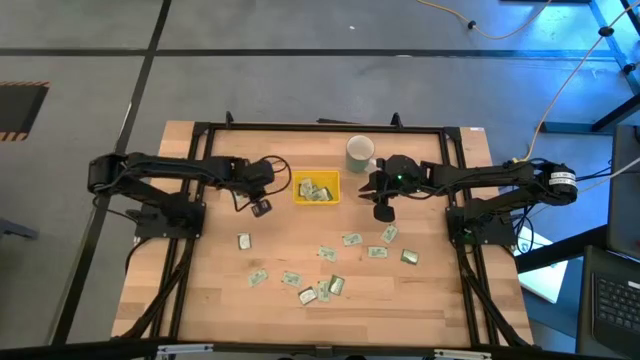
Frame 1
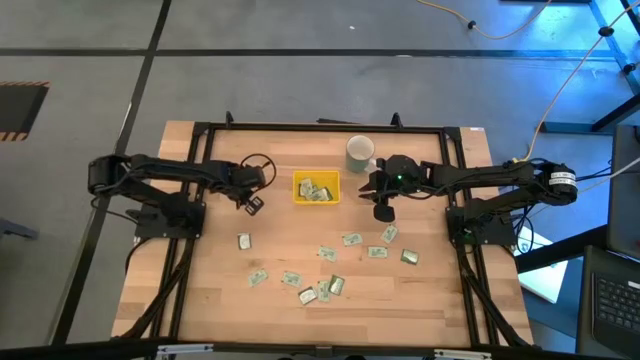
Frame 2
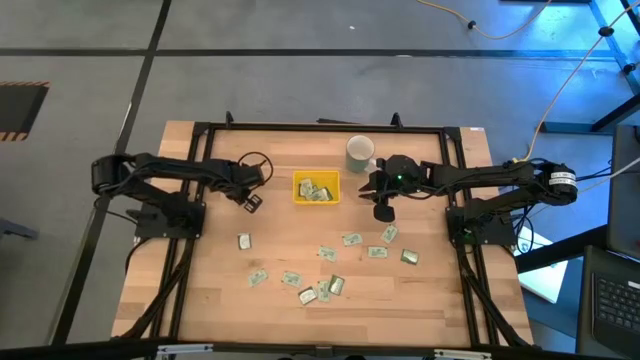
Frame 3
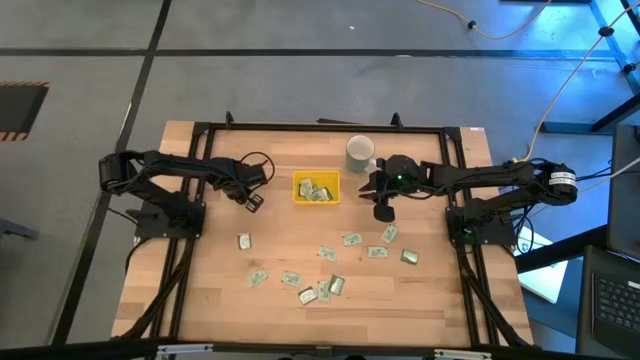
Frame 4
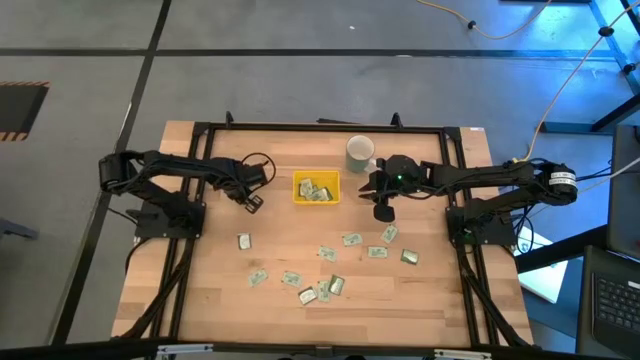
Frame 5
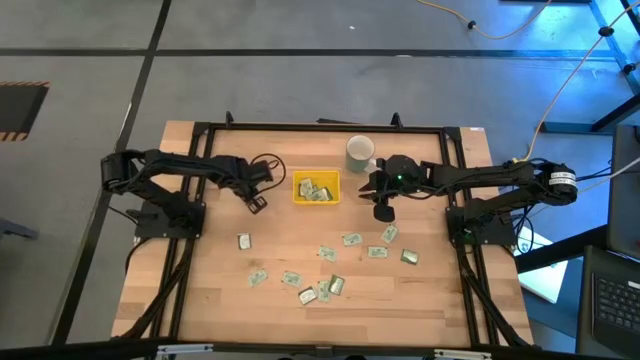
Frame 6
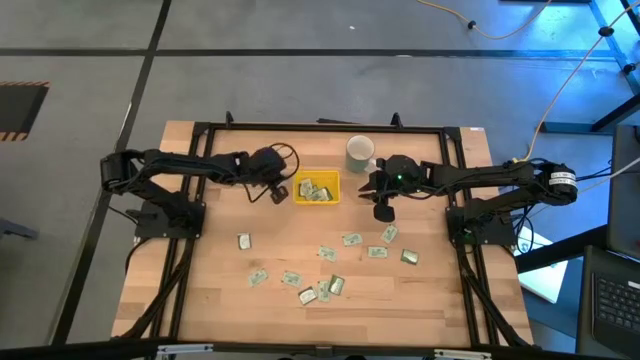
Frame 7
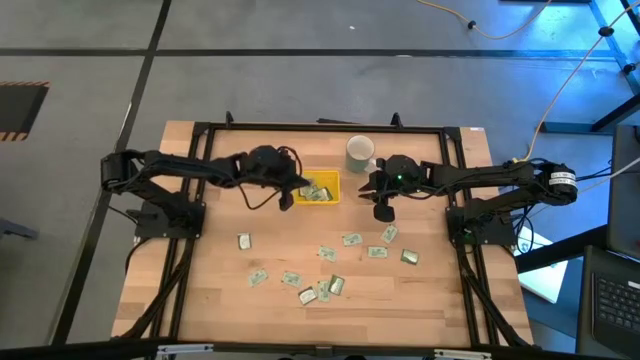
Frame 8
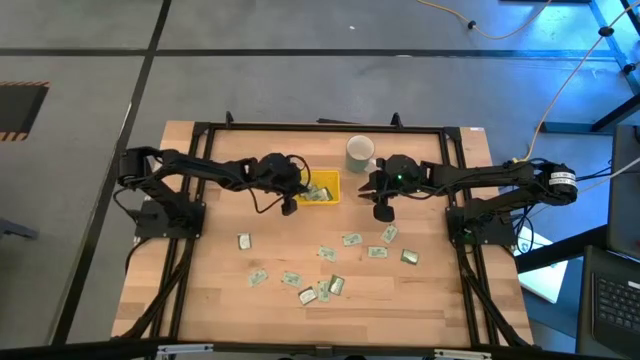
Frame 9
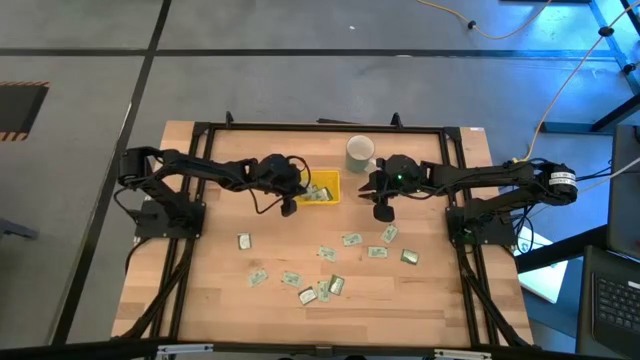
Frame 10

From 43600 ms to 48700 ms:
Task: Pick and place Stevia / Truvia into bins
Put the top left stevia tea packet into the yellow bin

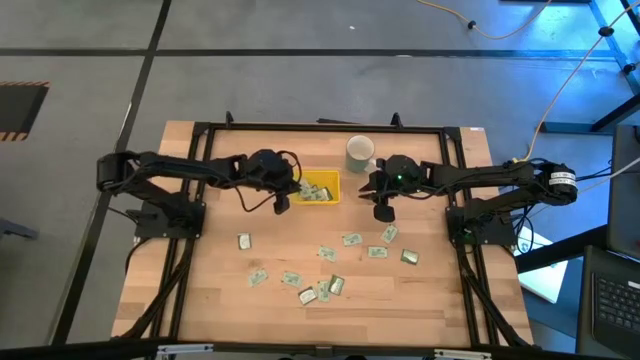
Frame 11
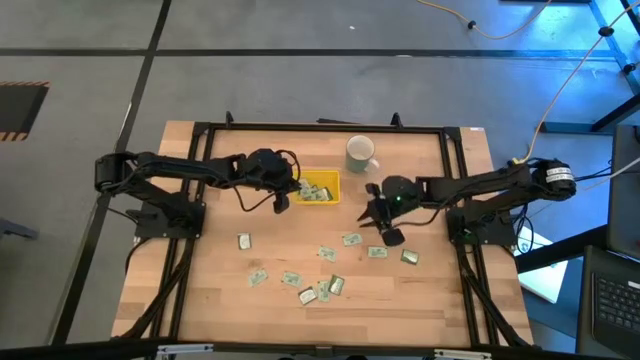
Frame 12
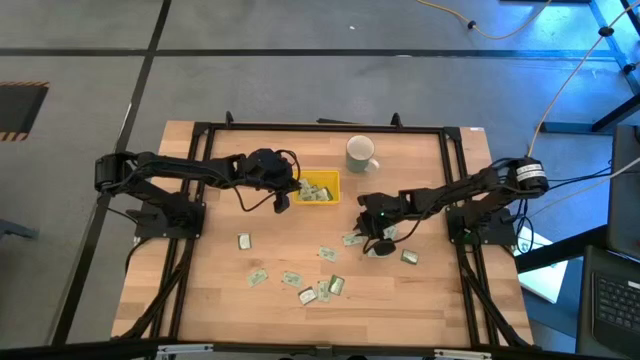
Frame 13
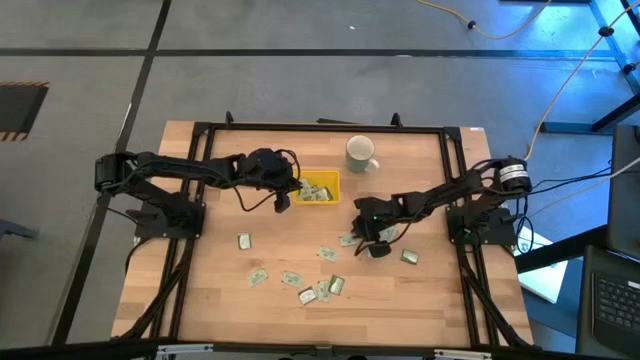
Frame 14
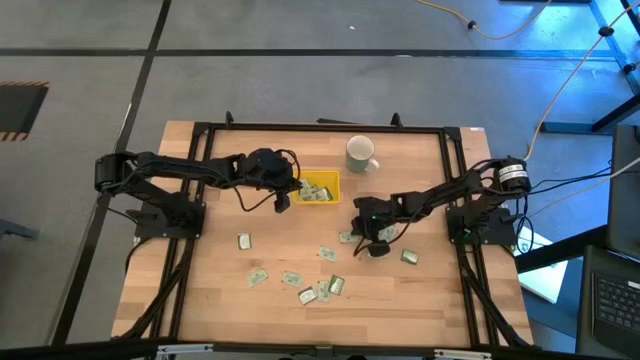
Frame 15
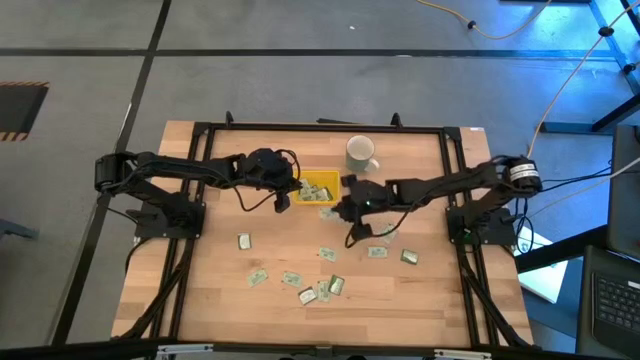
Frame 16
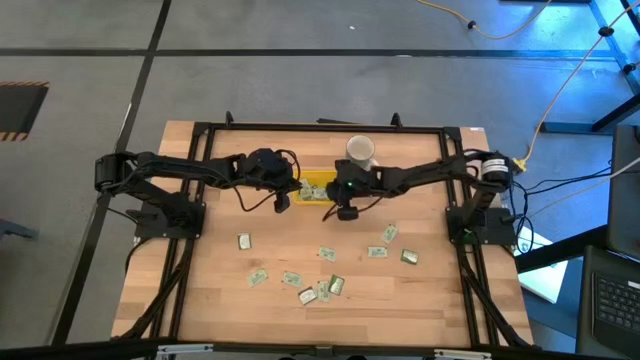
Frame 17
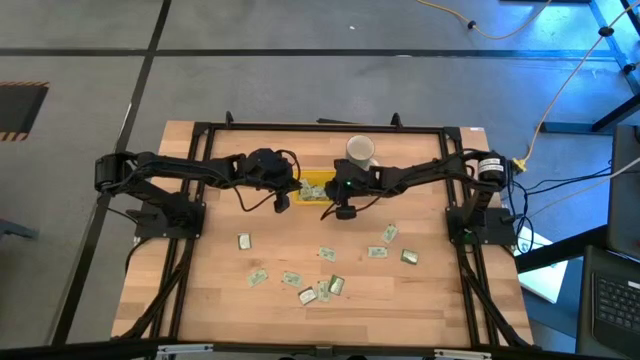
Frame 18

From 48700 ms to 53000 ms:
Put the middle stevia tea packet into the yellow bin

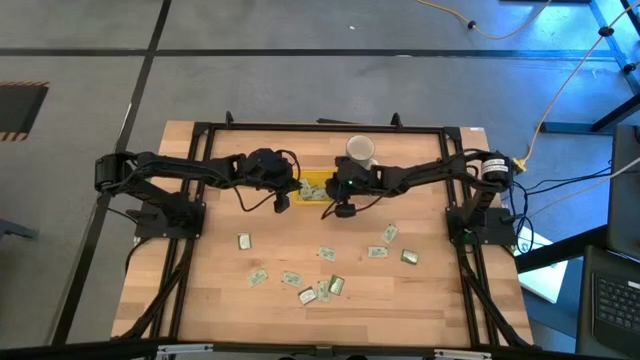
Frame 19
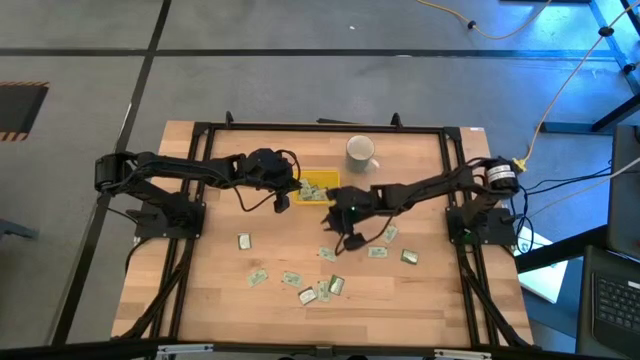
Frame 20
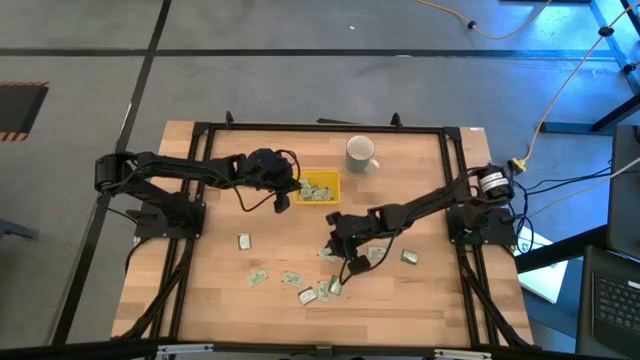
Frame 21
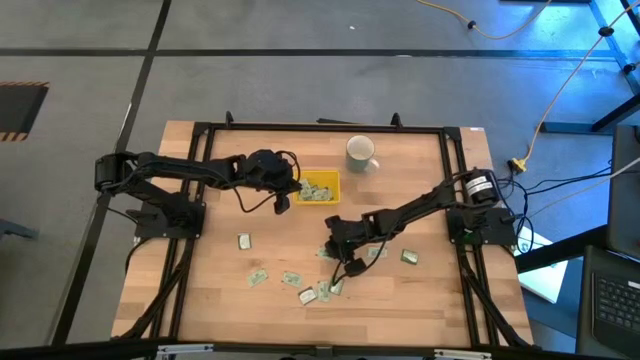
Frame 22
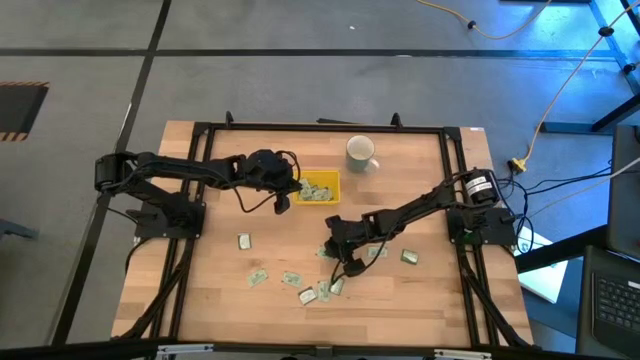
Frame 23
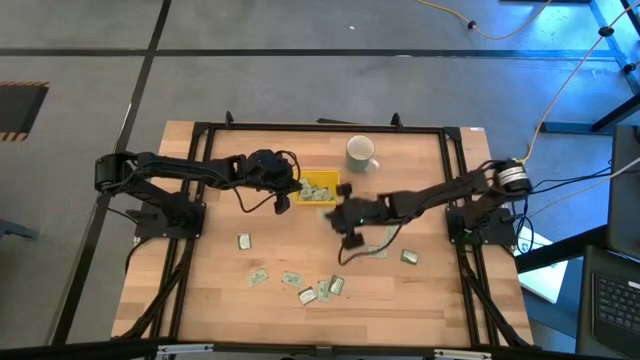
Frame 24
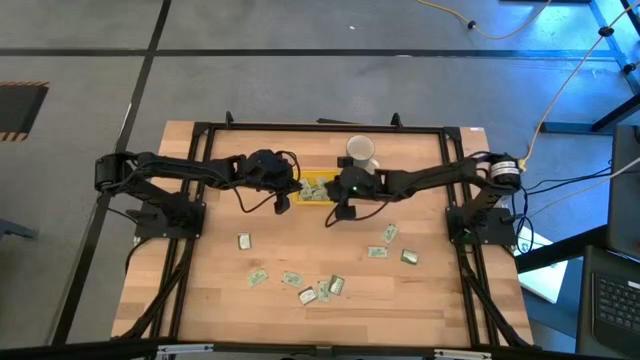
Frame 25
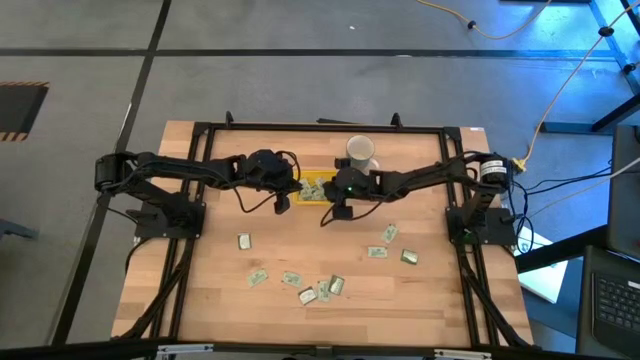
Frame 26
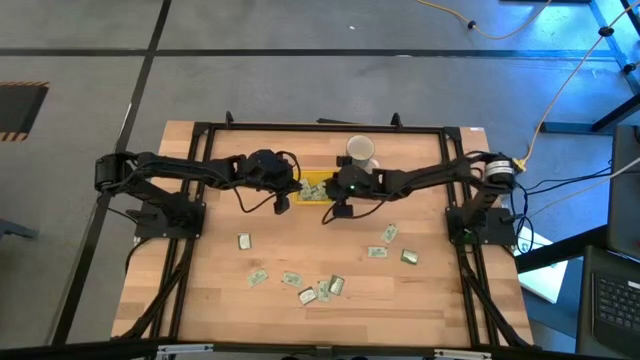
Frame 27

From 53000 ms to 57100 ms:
Put the middle stevia tea packet into the yellow bin

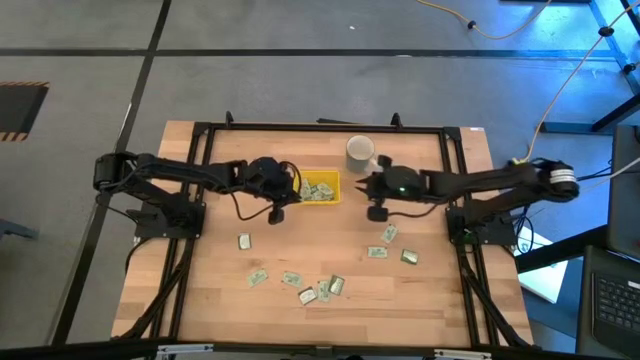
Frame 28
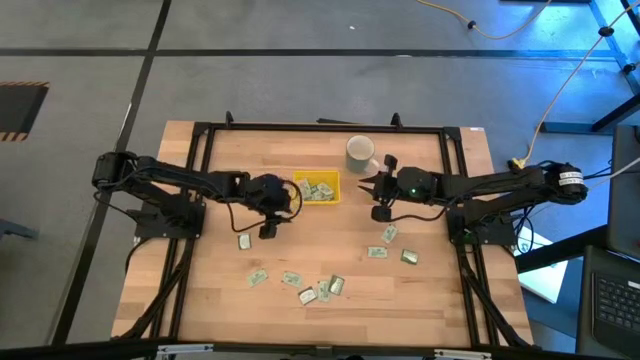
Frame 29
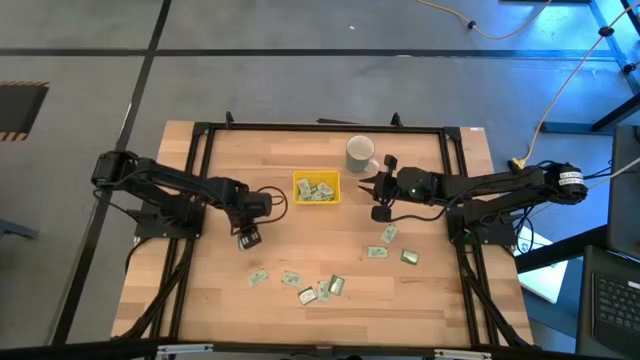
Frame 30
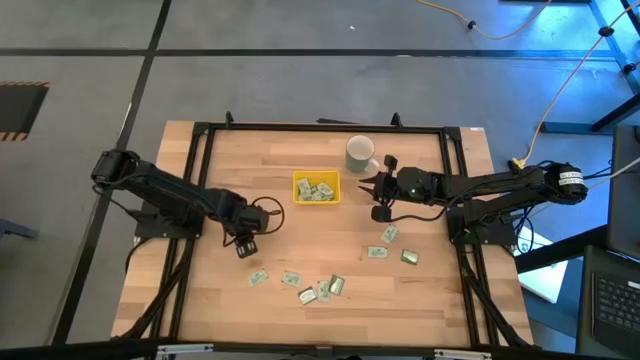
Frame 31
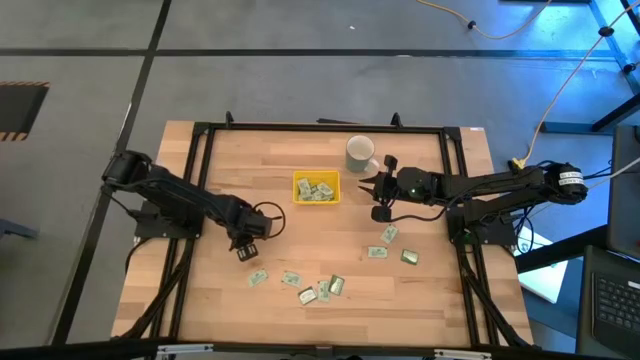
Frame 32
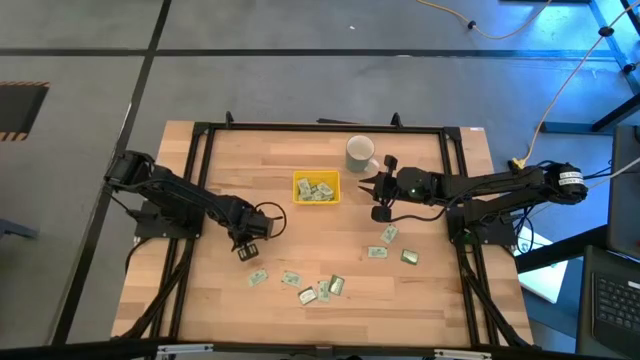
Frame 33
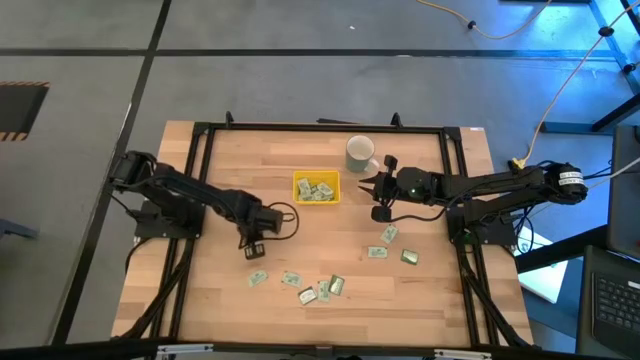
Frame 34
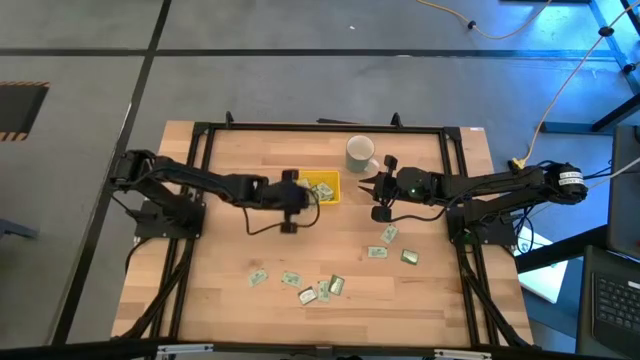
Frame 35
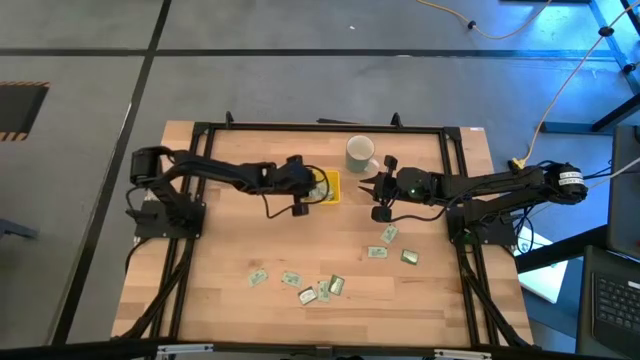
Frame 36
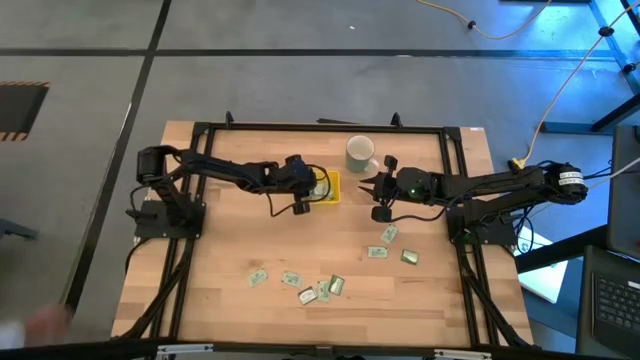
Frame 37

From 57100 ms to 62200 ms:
Put the middle truvia tea packet into the yellow bin

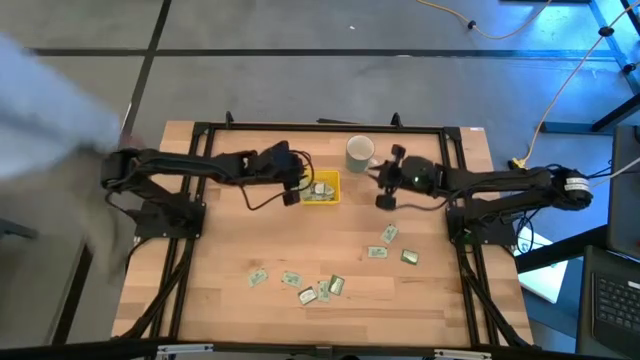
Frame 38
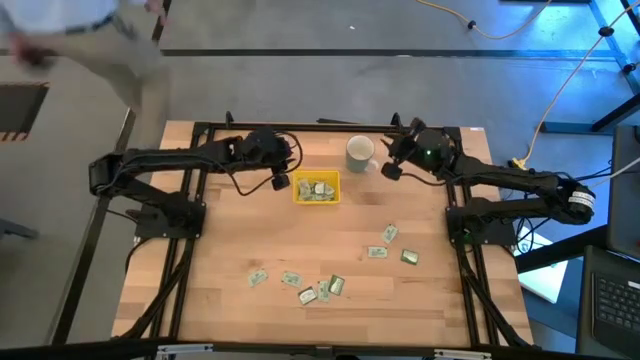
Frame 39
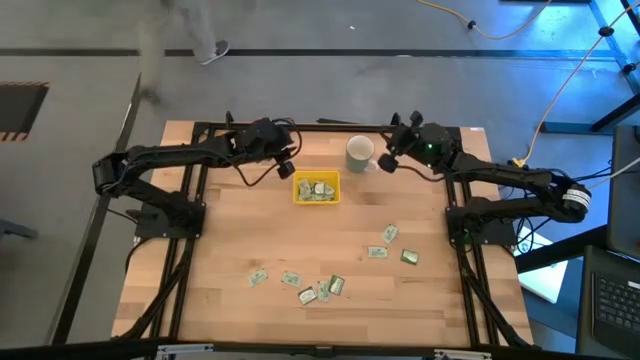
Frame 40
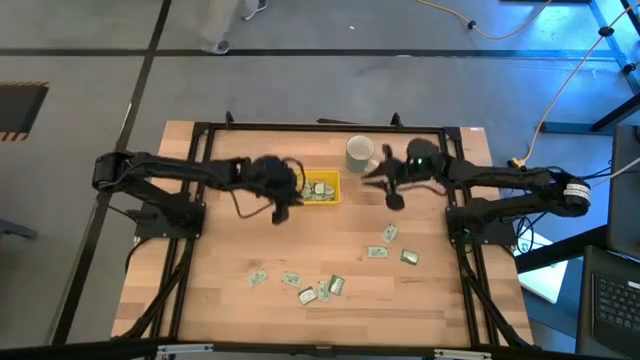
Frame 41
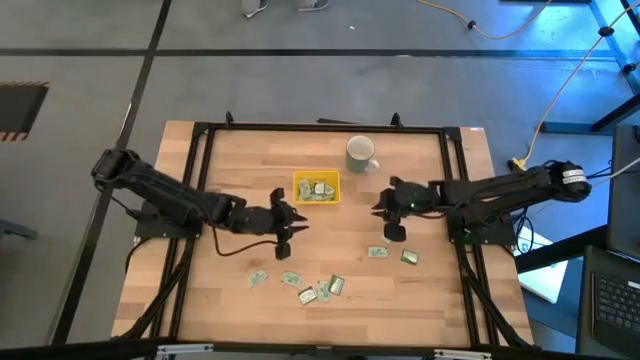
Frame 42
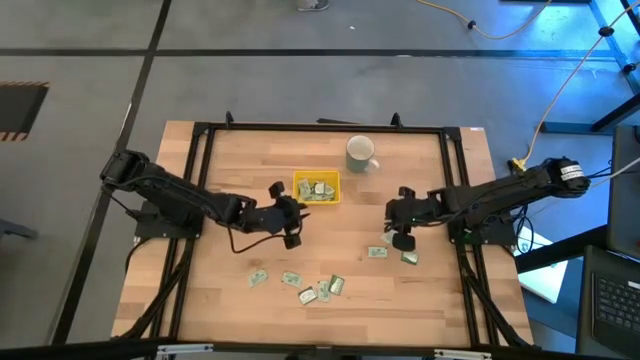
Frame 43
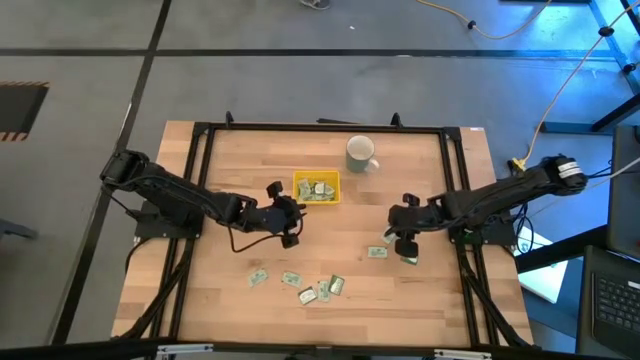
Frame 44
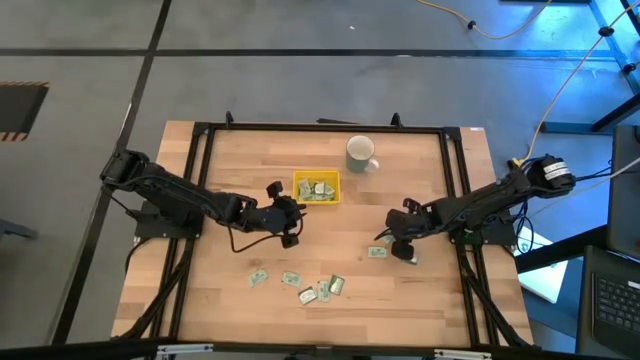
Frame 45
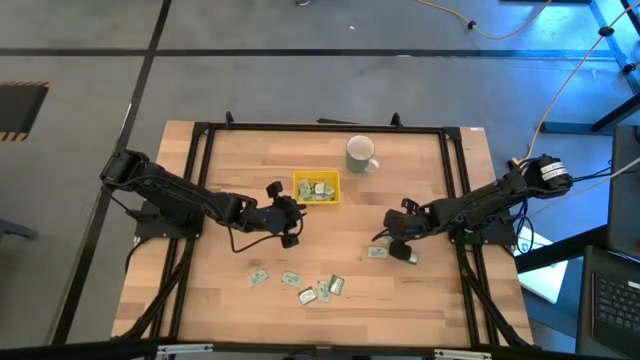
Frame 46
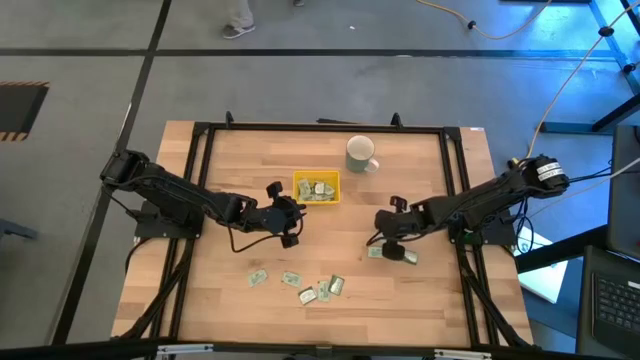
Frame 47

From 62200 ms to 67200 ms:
Put the middle right stevia tea packet into the yellow bin
